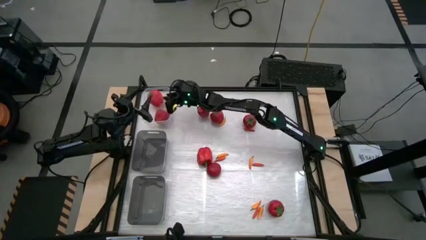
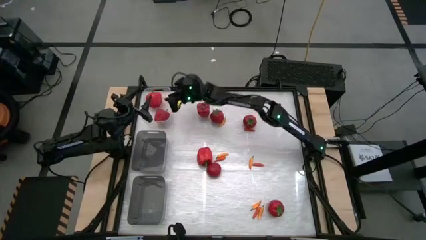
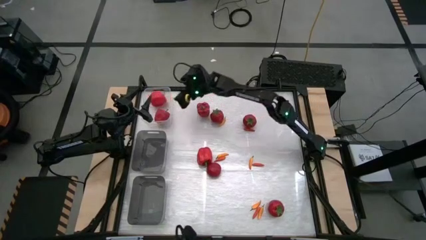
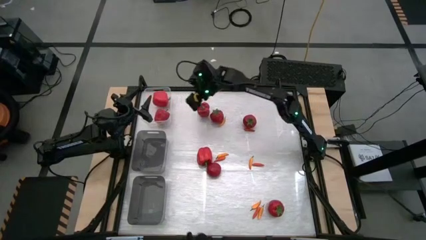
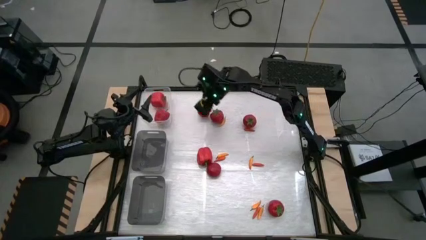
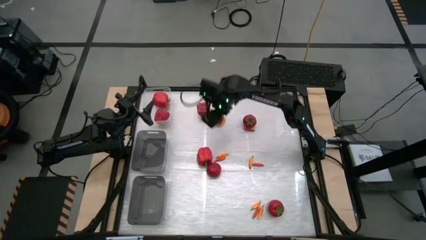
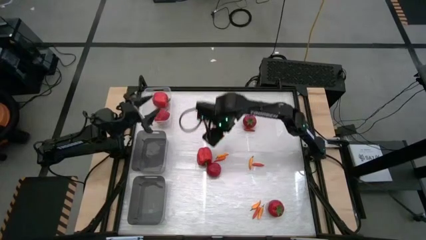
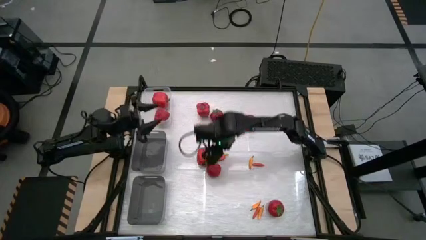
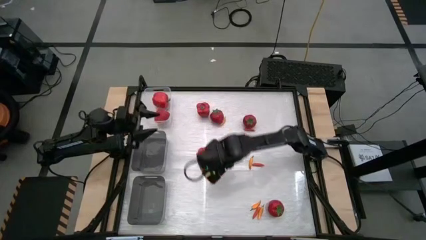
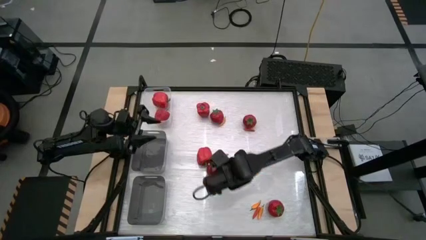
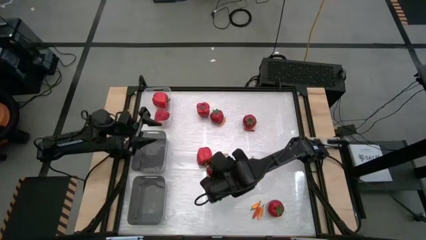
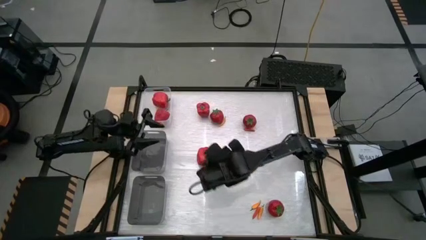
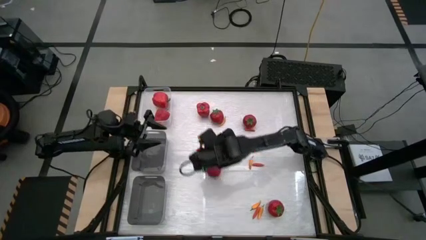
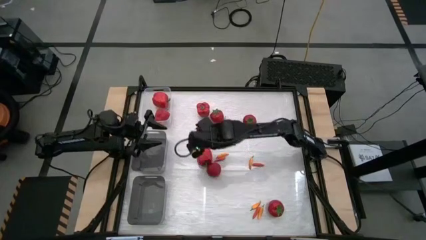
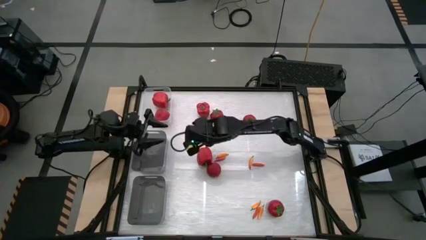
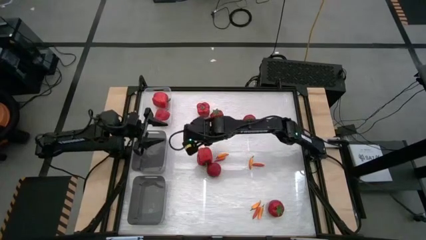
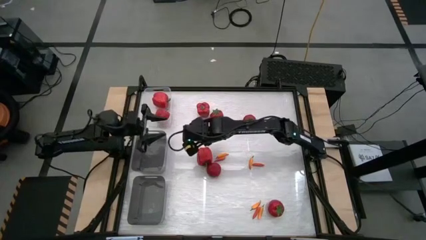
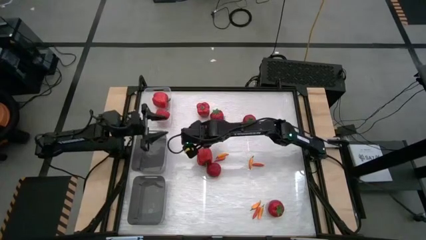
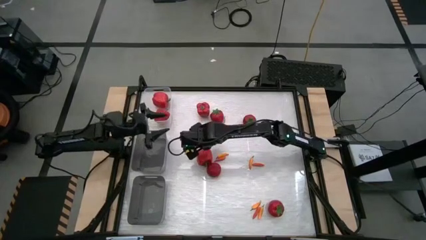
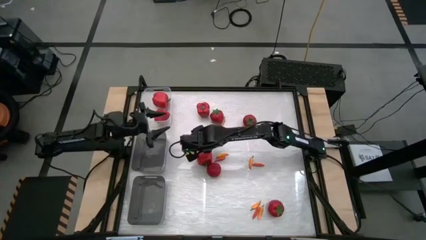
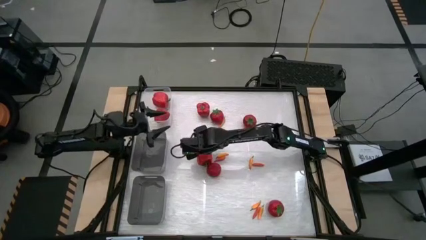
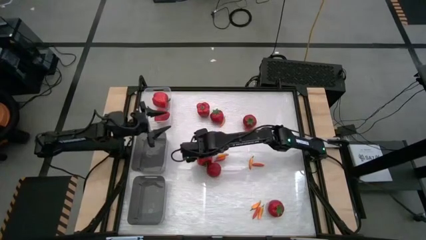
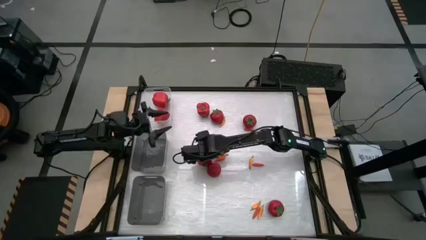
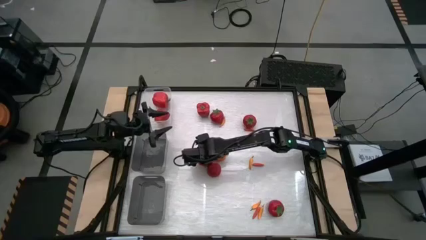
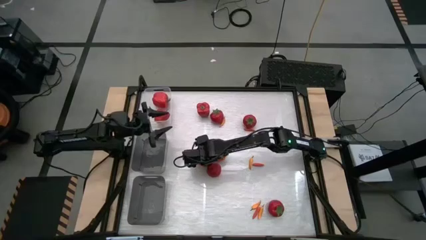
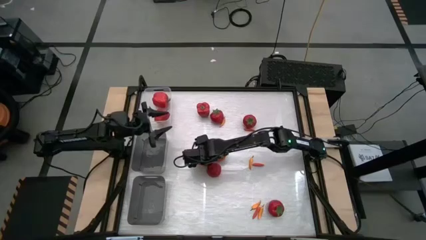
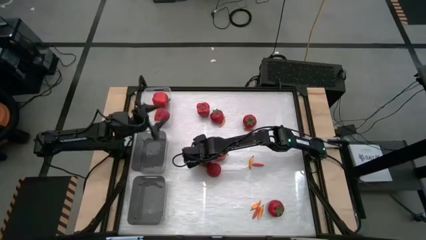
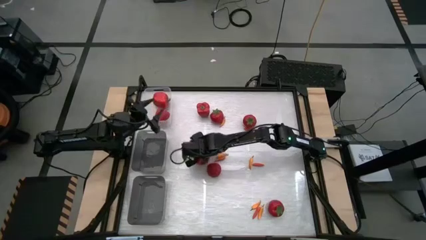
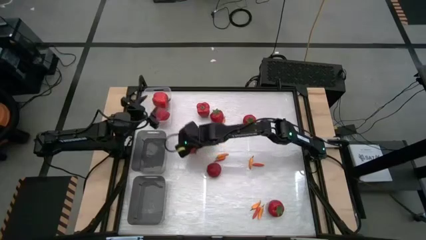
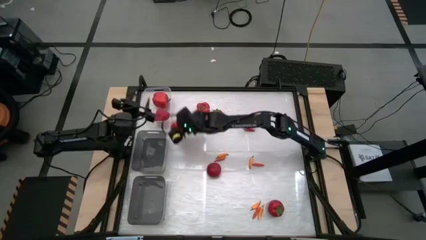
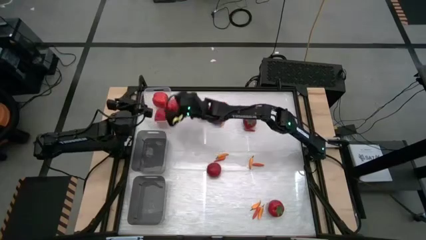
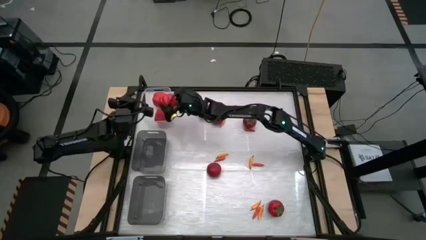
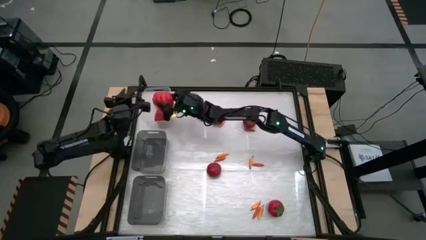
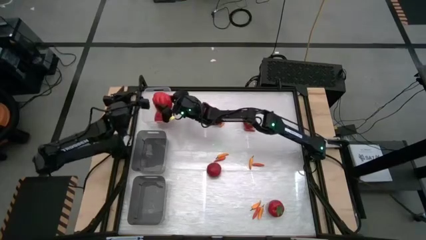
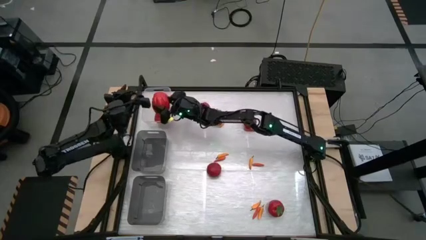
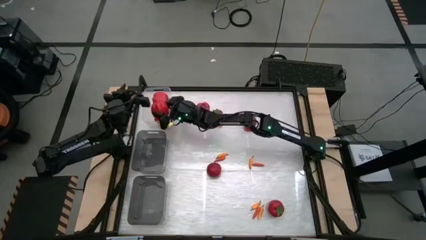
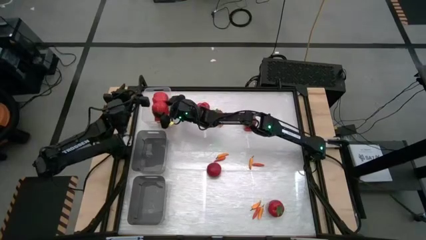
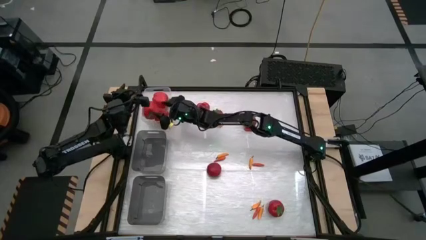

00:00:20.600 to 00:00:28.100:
Task: Sort produce into baskets
Put the bottom red bell pepper into the transparent bin

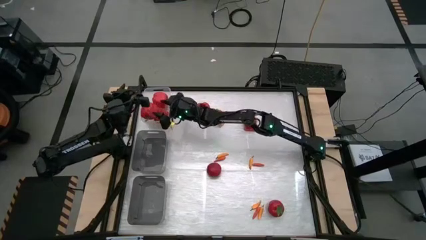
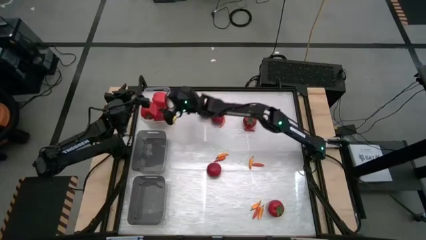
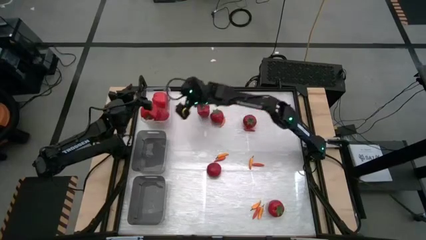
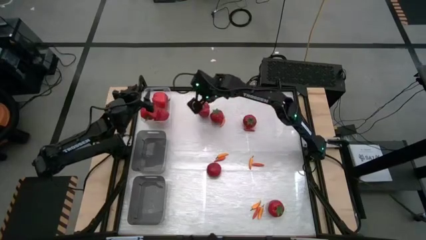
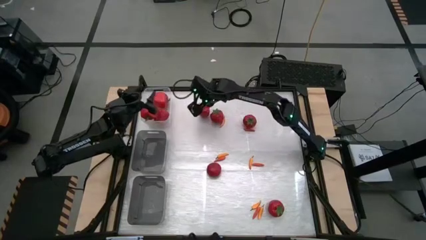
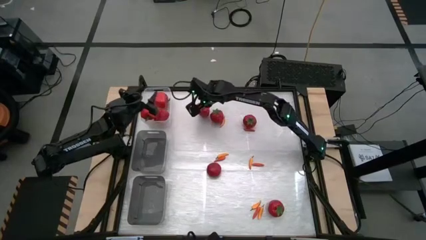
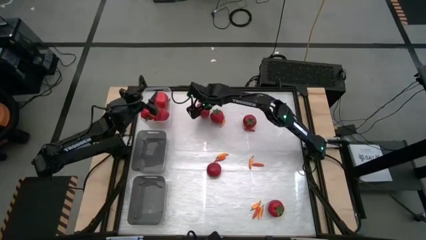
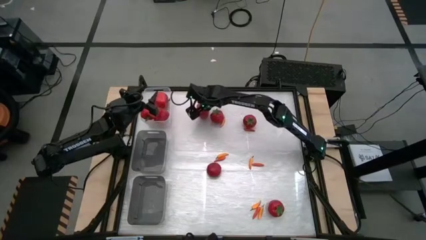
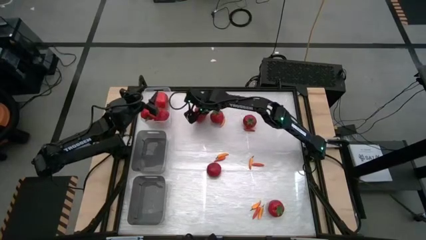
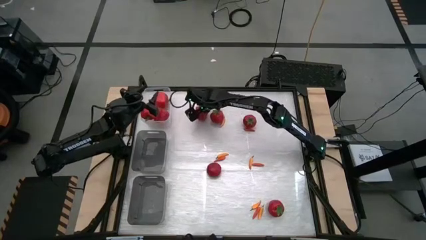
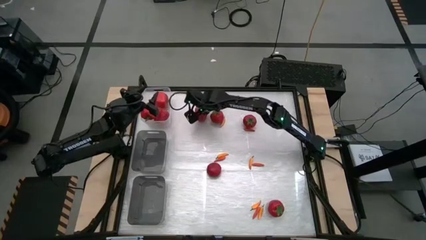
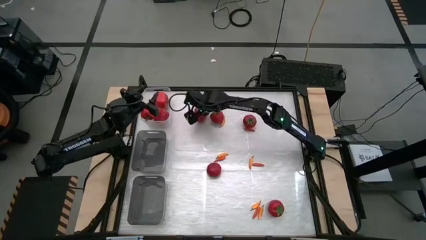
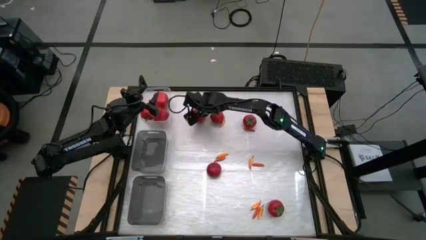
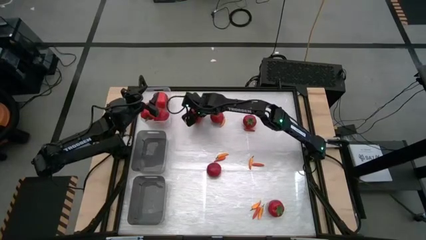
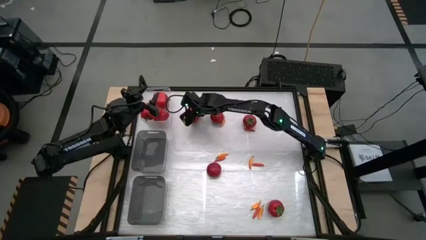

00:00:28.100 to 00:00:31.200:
Put the red bell pepper into the transparent bin

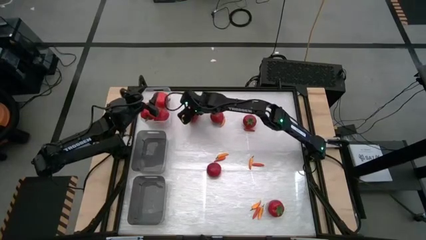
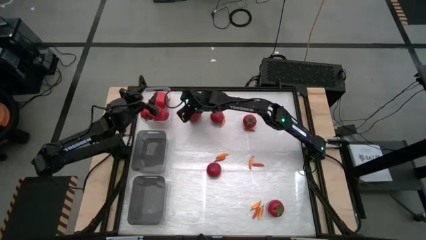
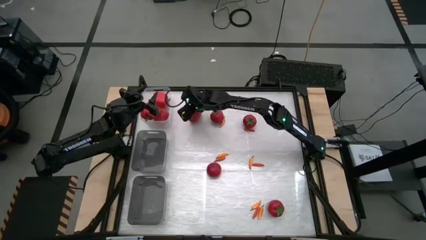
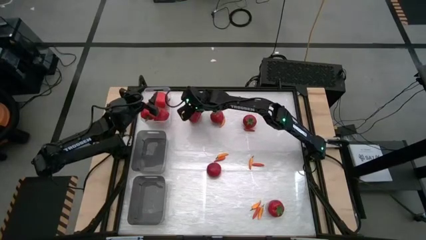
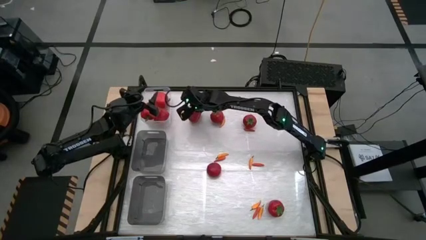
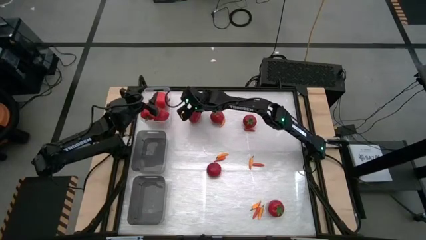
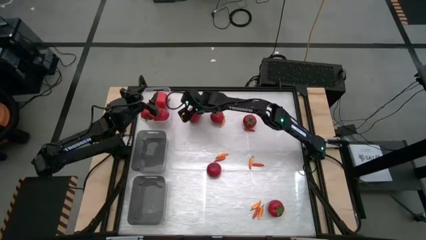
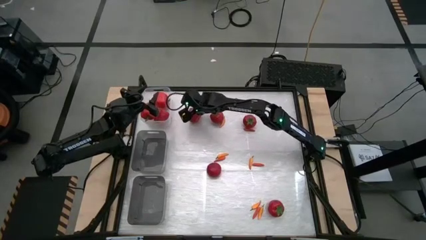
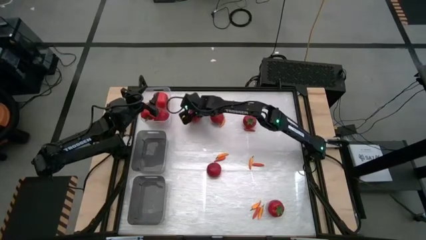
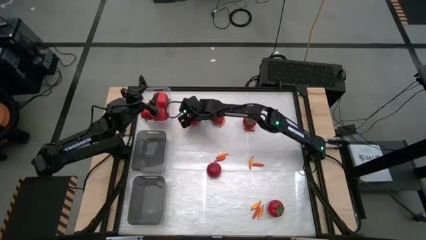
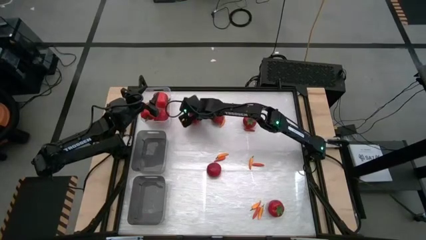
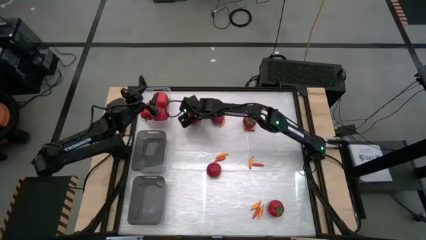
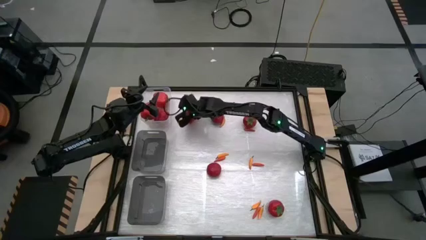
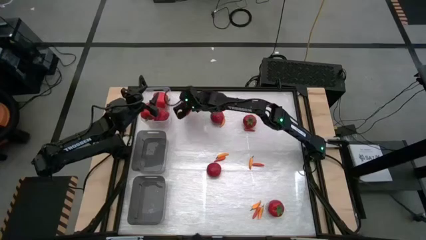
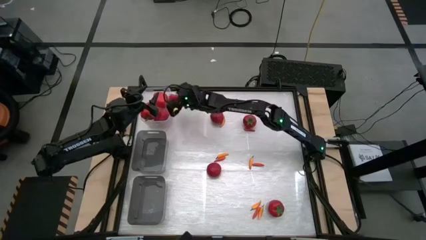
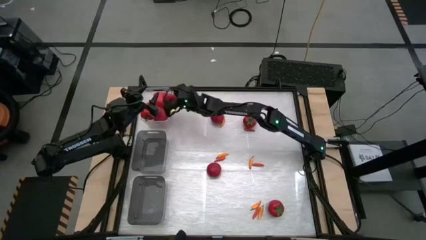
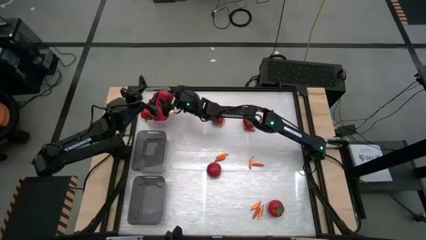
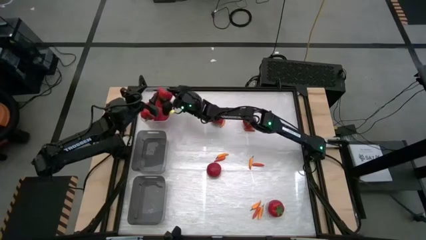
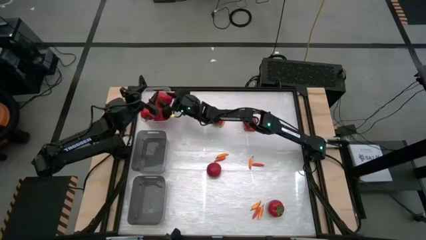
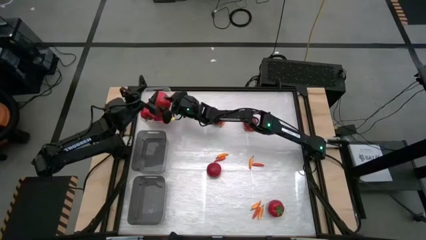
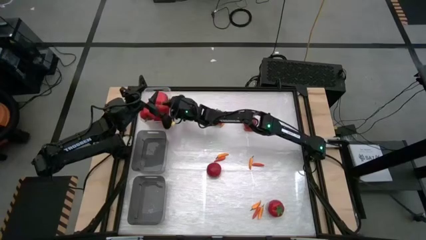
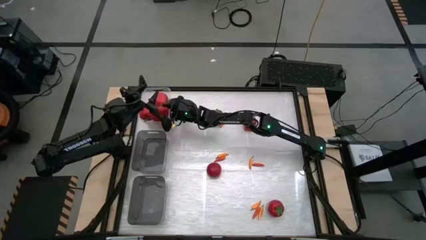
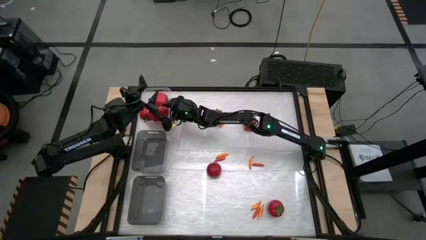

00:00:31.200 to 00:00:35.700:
Put the red bell pepper into the transparent bin

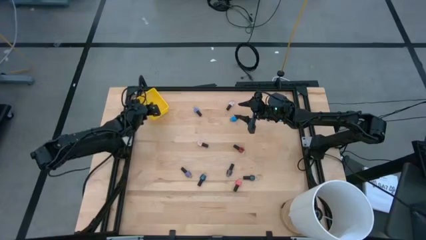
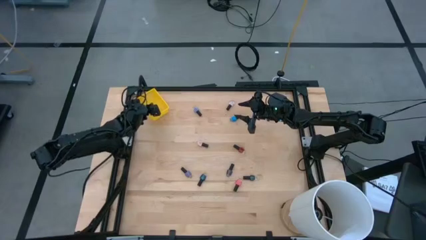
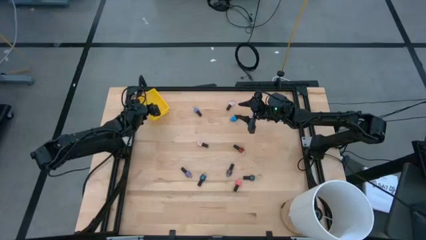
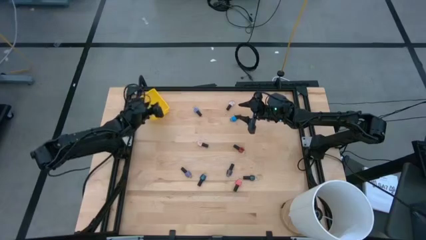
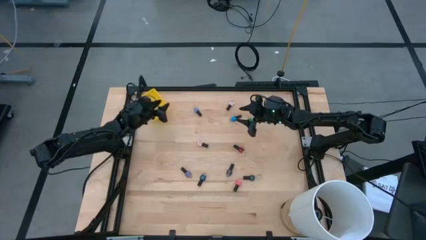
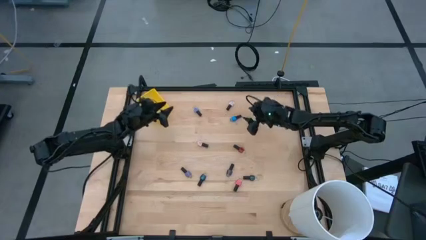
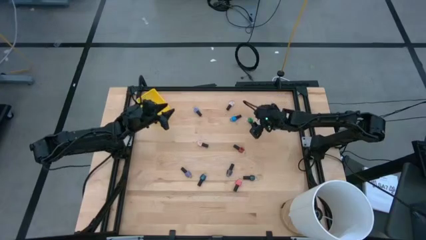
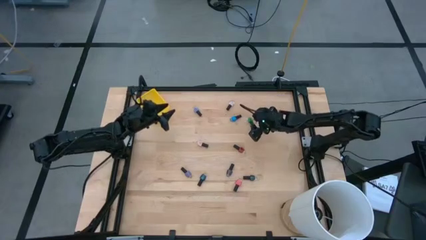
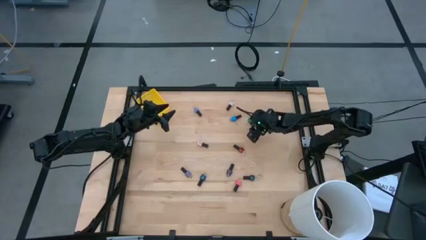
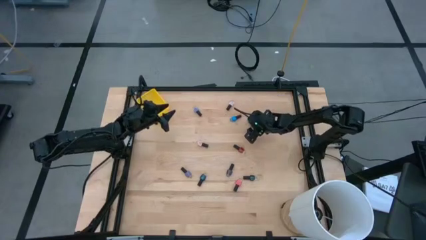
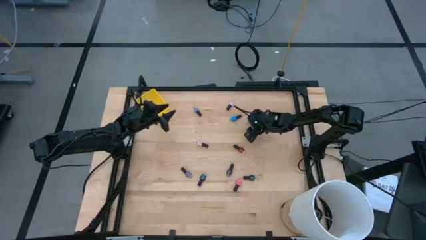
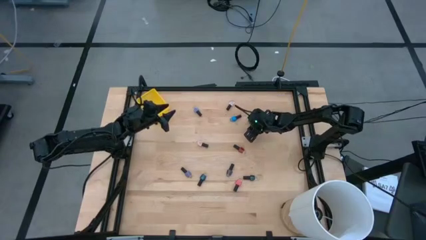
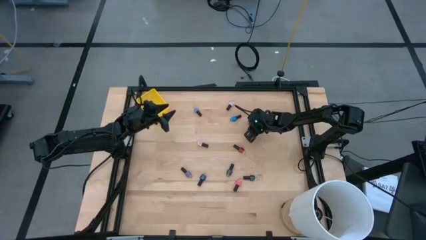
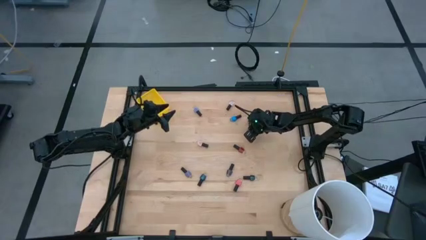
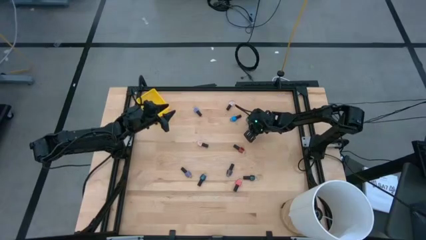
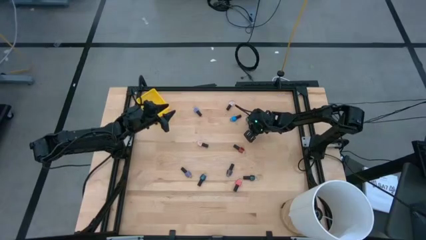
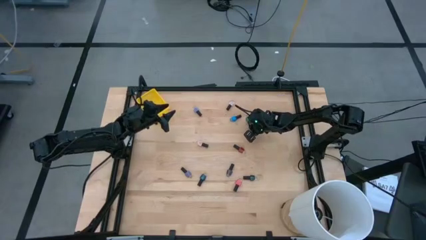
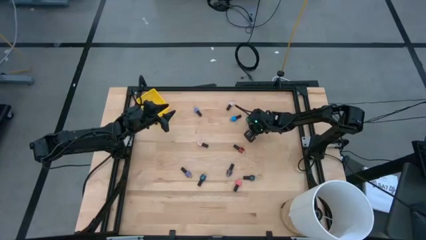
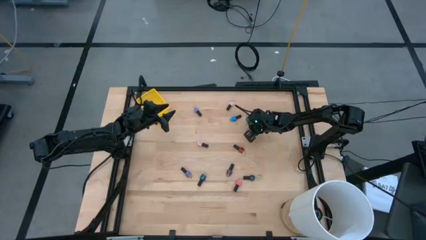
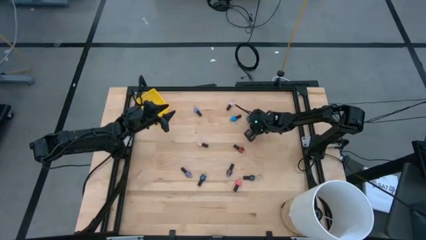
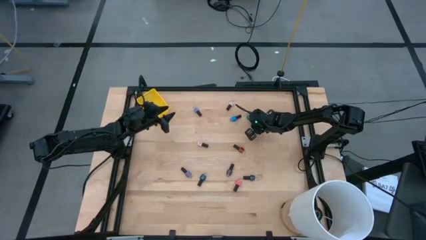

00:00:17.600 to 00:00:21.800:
Task: Pick & Place Nail Polish
Put the green nail polish into the yellow bin
